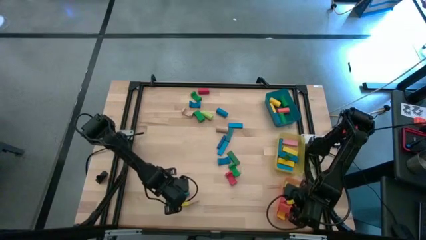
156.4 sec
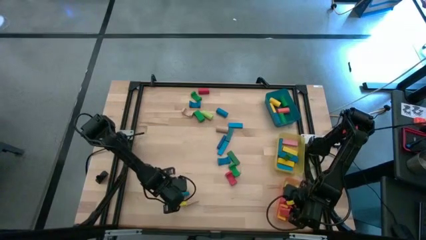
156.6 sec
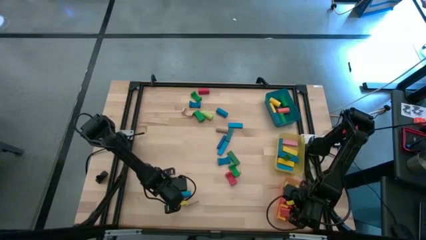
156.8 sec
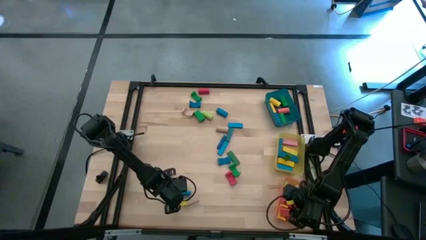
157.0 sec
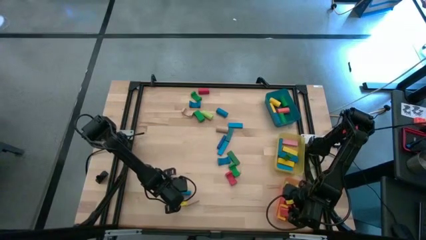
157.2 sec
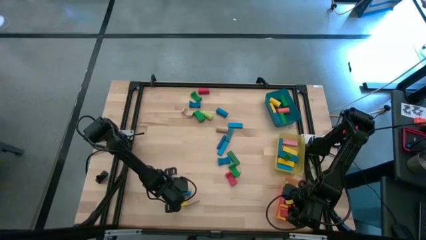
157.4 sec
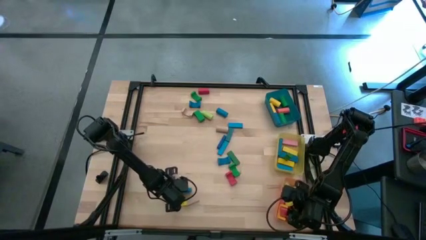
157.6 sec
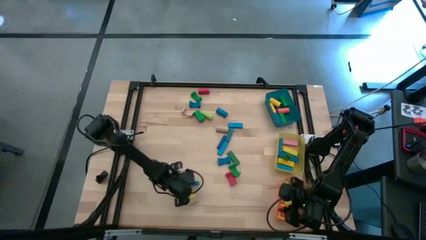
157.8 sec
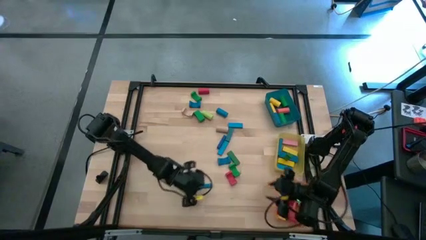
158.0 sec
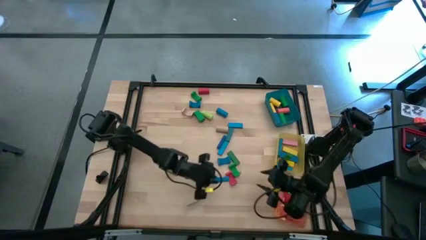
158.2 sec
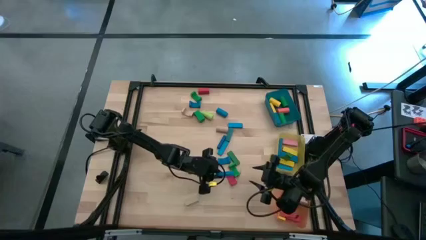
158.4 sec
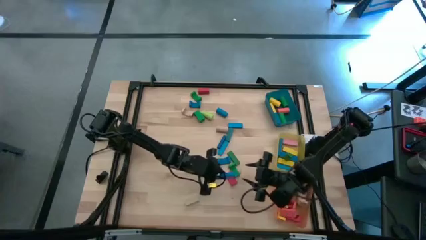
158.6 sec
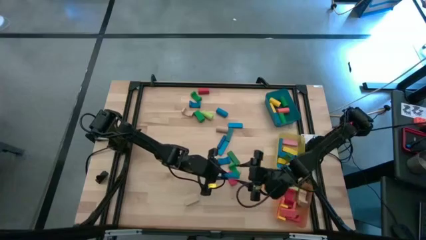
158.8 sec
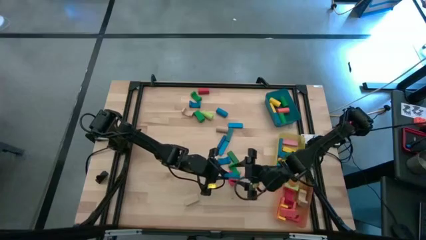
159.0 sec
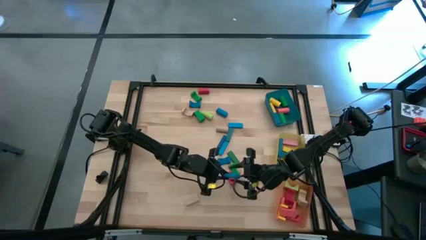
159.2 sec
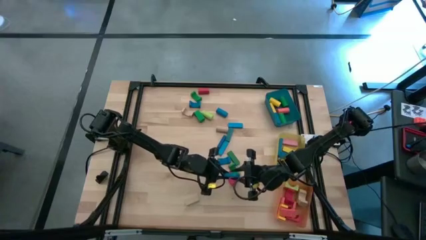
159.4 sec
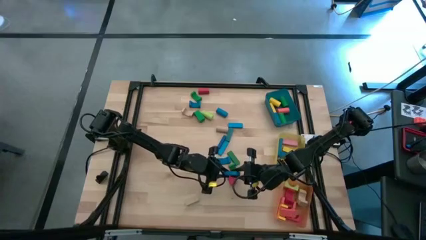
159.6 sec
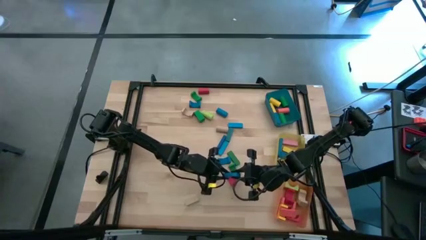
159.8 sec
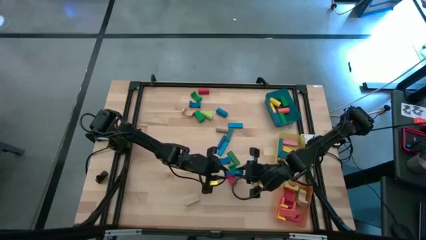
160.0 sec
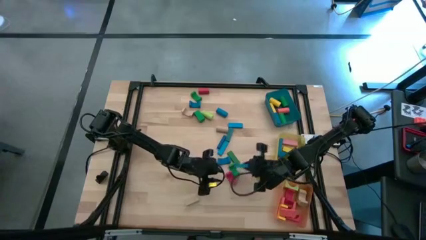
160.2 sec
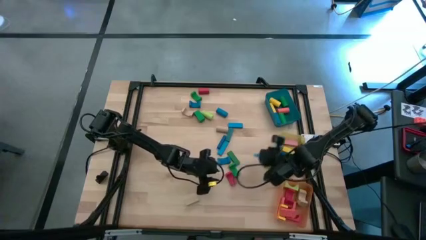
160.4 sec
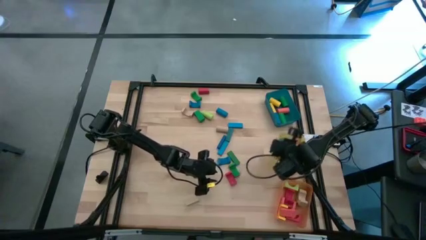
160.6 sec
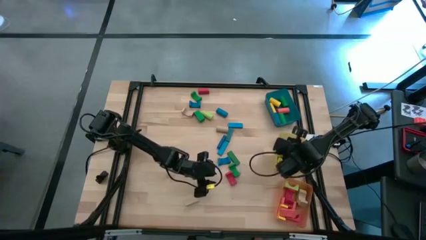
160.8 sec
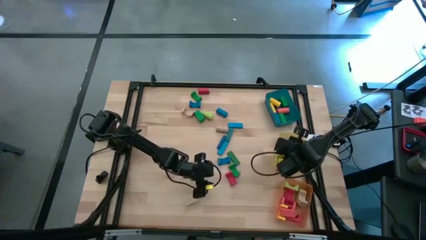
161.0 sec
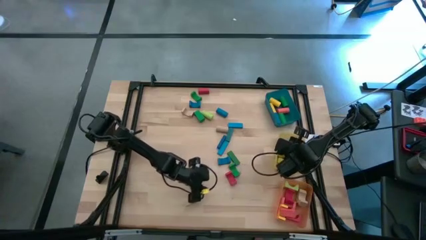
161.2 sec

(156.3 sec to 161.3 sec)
Task: Sort blocks by size
Put the blue rectangular block into the yellow bin

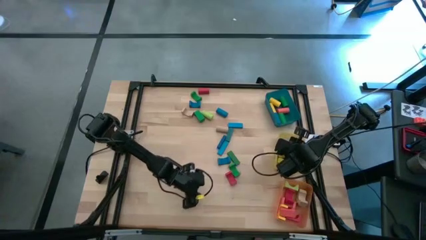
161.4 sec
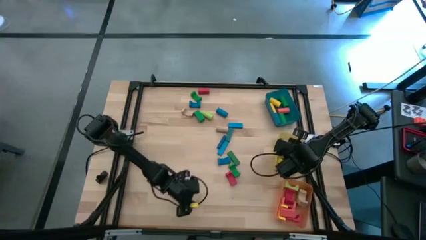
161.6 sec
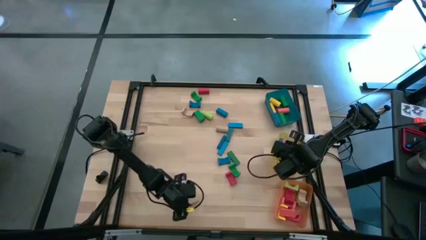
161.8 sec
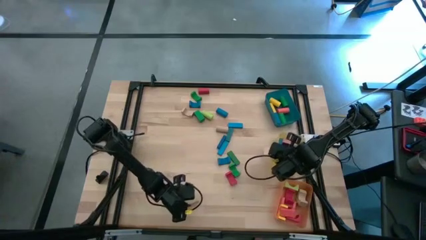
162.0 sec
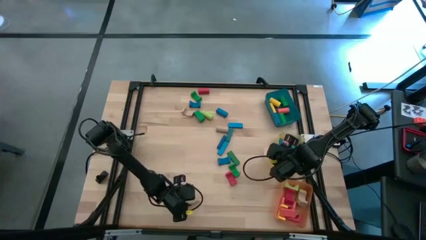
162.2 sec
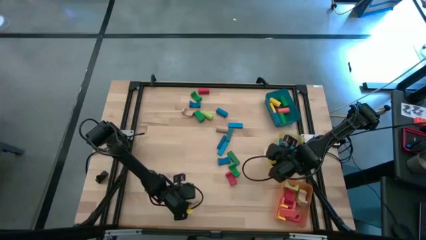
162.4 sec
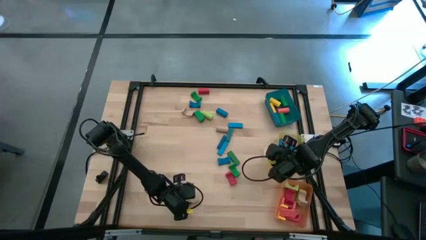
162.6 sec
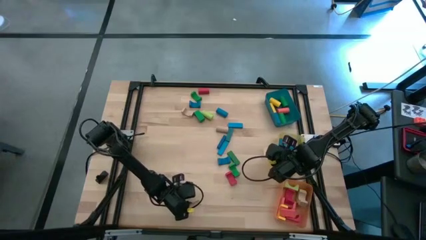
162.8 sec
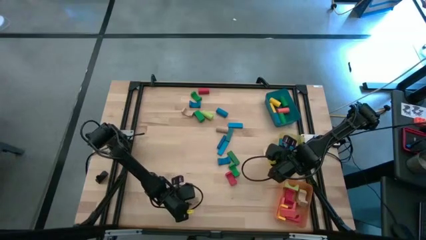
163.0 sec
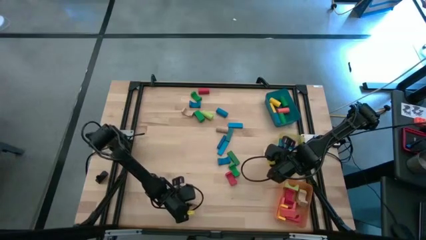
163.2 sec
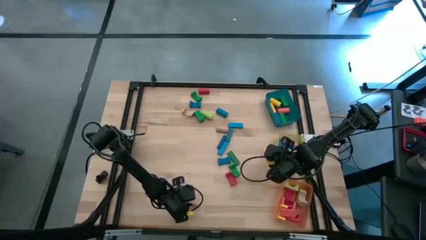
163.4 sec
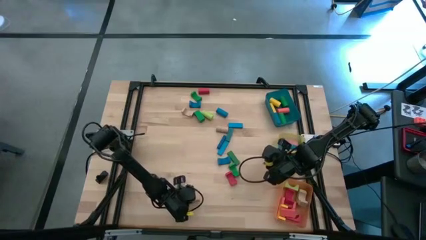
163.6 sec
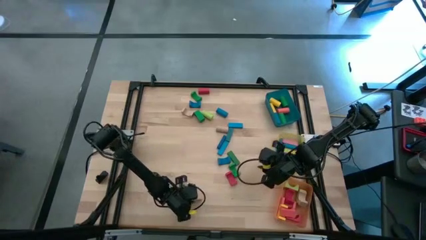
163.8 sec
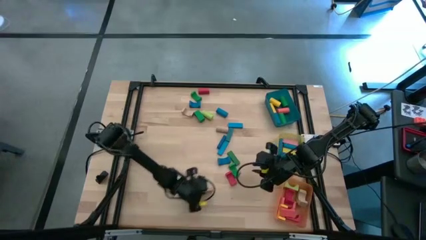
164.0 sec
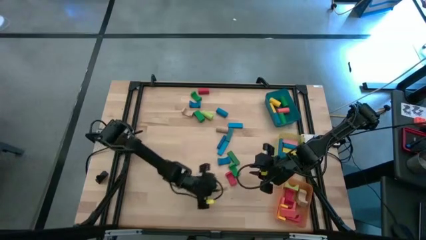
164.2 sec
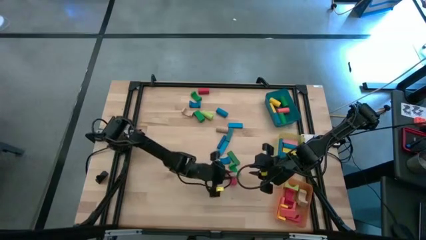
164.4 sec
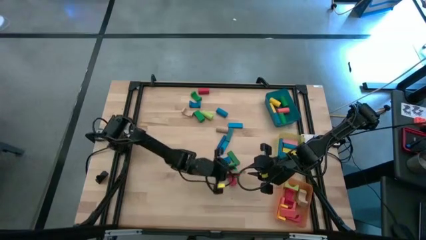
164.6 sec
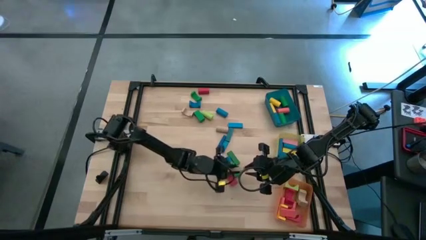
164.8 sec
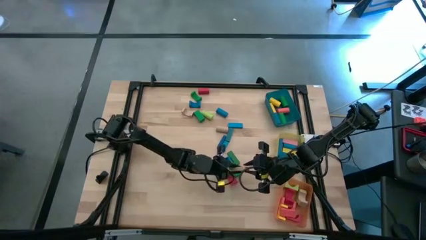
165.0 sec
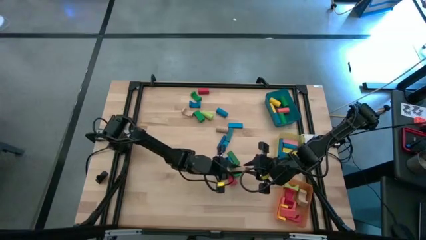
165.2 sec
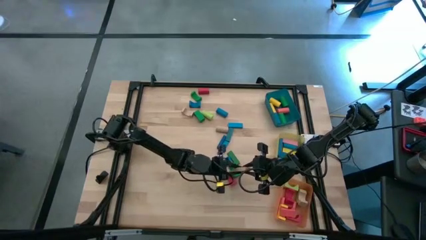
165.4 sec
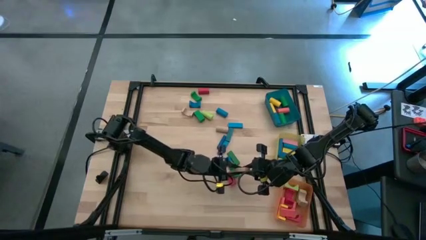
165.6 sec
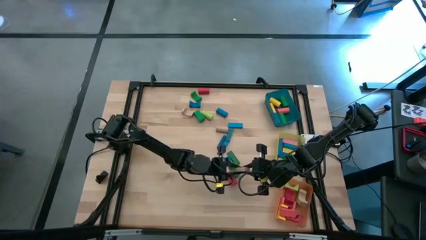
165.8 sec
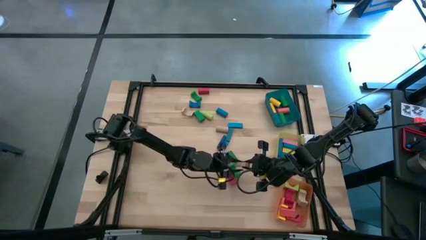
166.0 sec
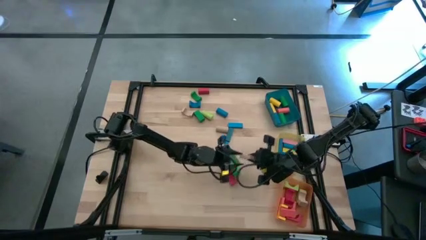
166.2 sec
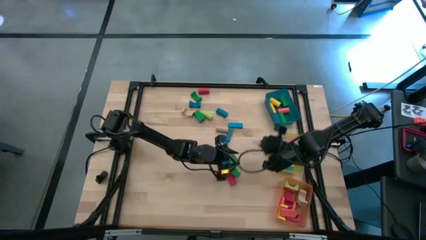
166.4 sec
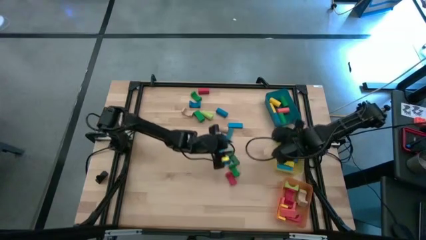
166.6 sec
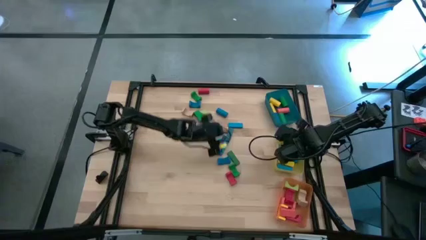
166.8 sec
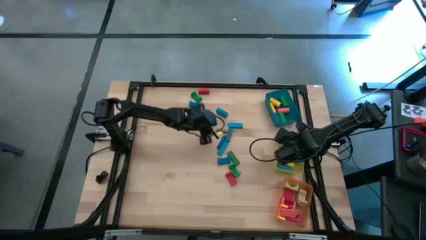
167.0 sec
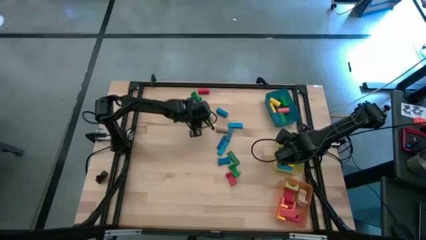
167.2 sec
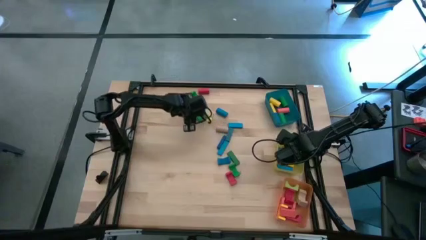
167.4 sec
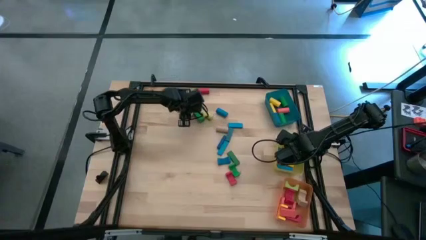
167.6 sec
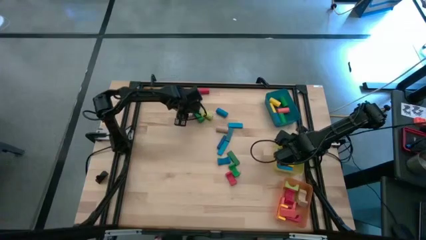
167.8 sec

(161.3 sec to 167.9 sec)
Put the brown rectangular block into the yellow bin

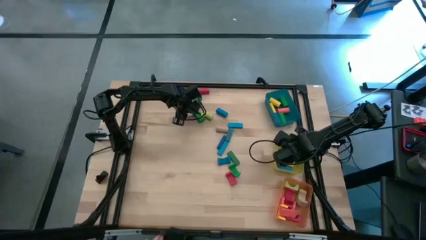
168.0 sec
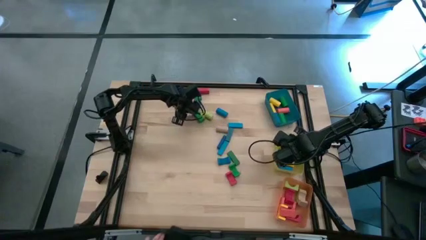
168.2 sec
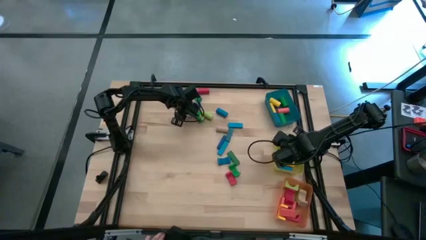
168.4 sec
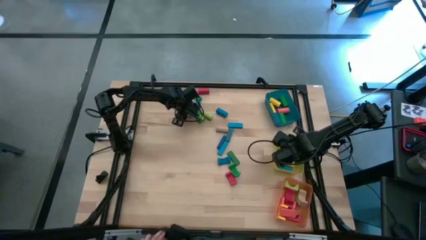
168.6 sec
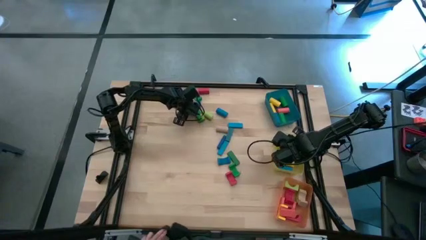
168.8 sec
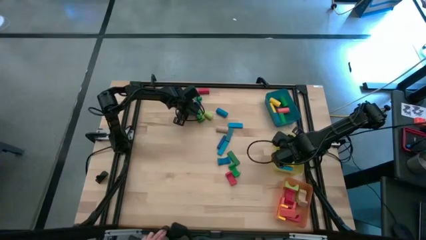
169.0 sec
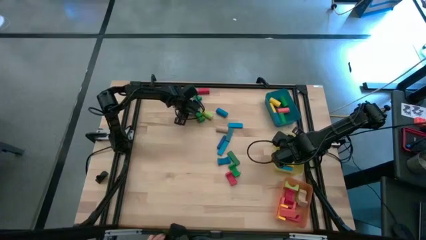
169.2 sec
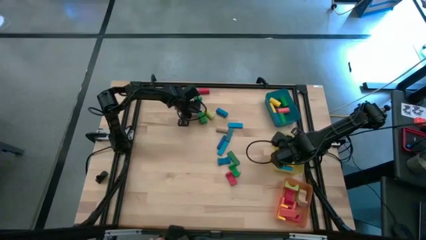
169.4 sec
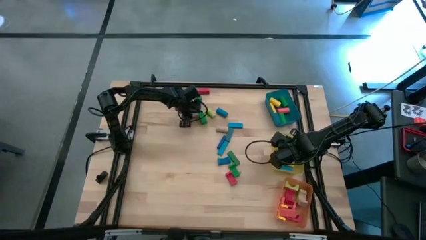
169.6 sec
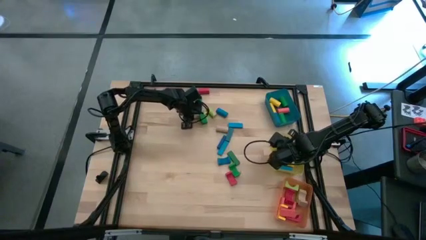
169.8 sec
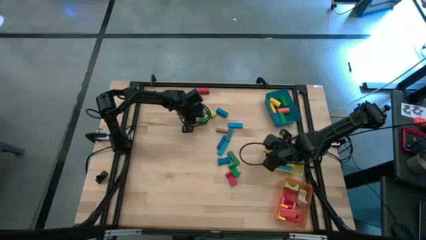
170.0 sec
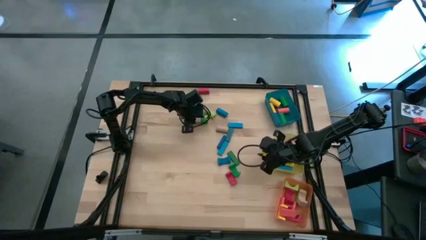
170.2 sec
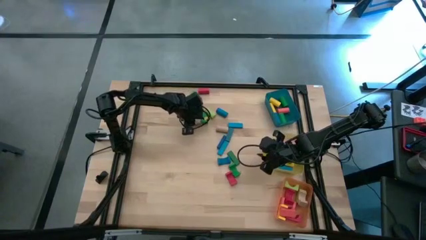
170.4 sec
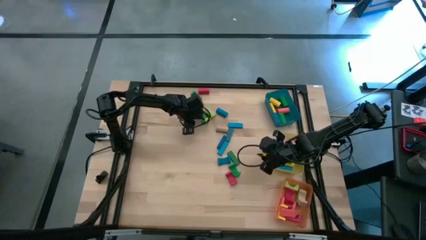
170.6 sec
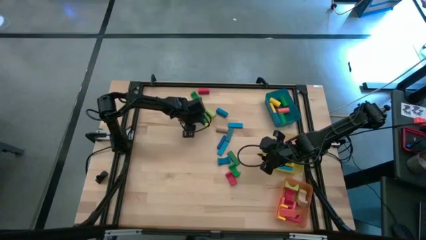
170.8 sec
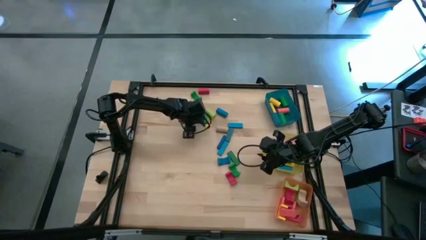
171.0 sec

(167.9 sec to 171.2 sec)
Put the brown arch block into the orange bin
